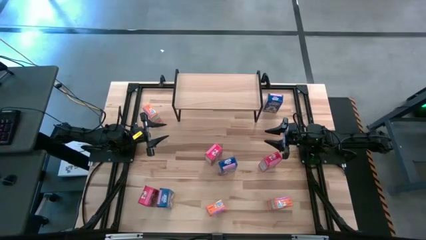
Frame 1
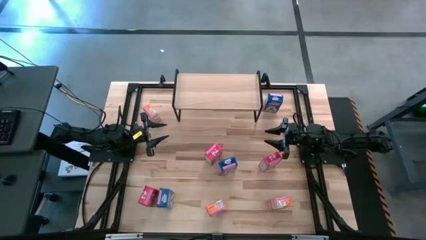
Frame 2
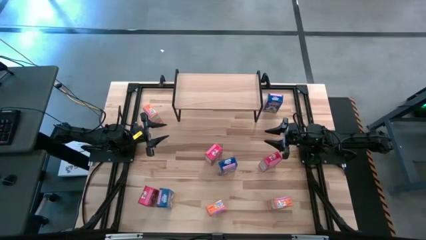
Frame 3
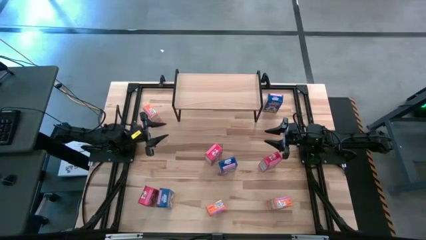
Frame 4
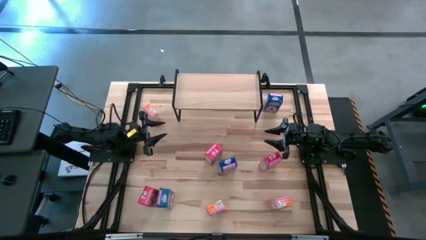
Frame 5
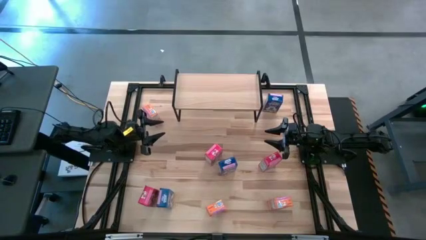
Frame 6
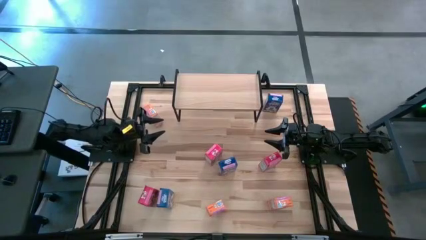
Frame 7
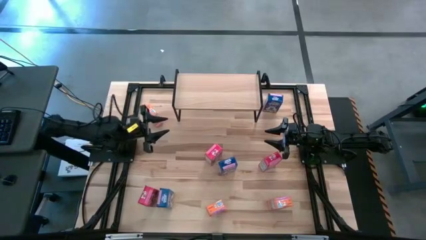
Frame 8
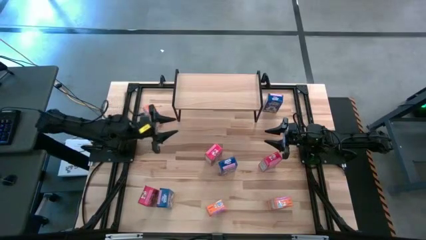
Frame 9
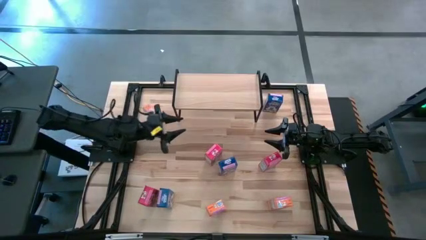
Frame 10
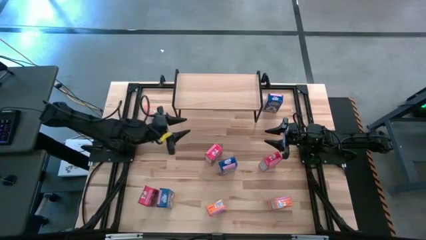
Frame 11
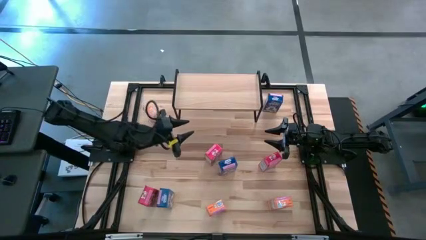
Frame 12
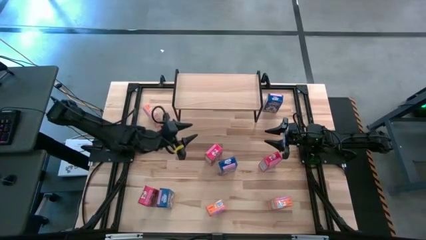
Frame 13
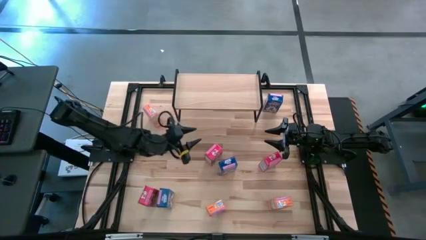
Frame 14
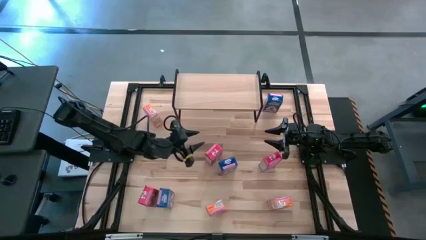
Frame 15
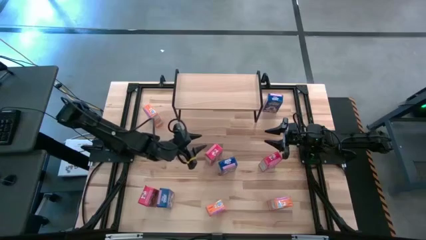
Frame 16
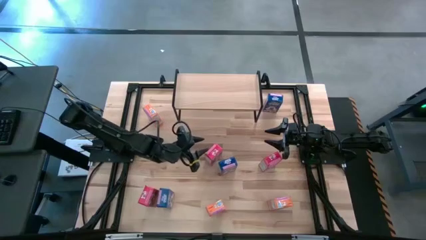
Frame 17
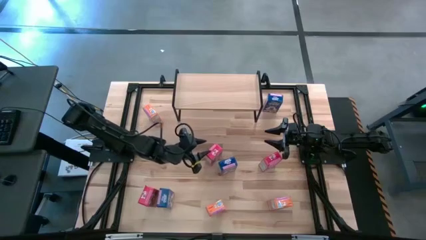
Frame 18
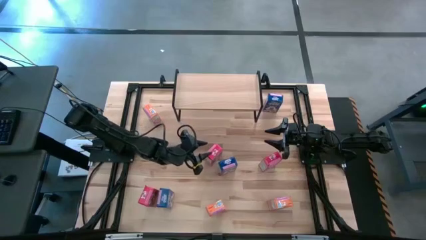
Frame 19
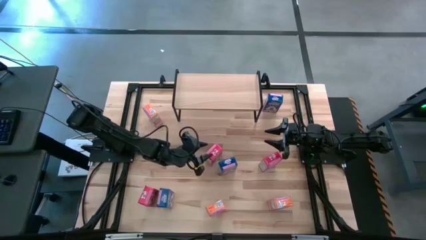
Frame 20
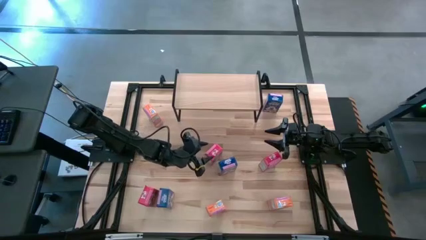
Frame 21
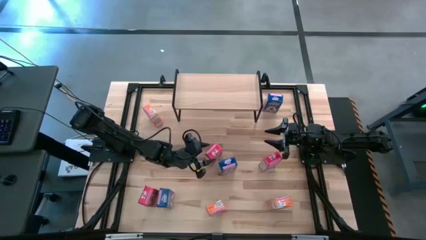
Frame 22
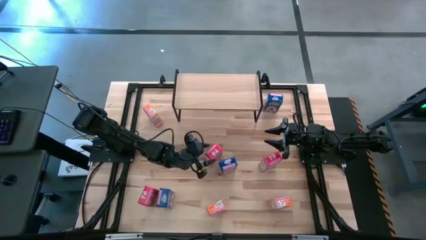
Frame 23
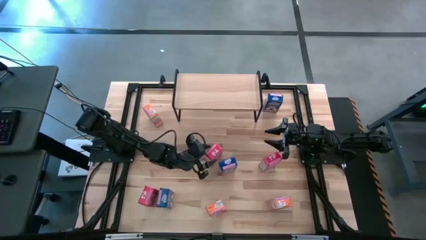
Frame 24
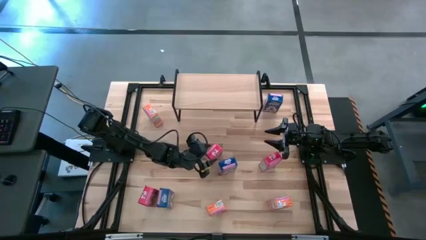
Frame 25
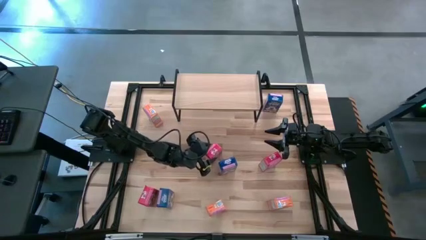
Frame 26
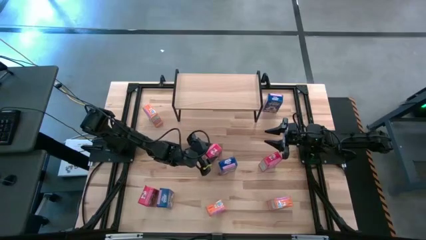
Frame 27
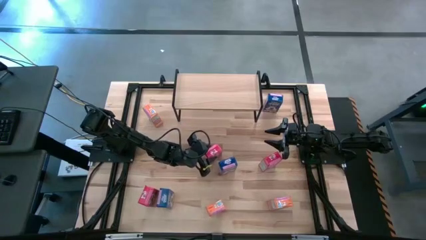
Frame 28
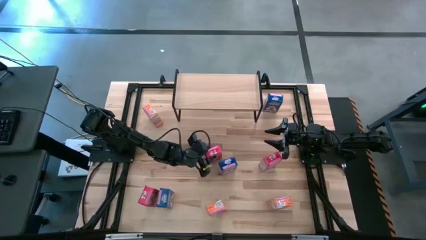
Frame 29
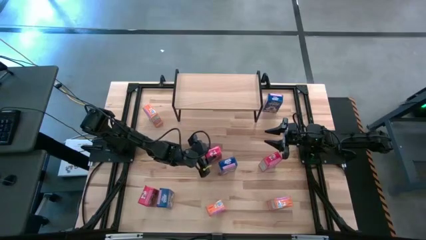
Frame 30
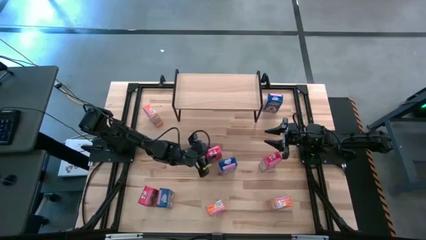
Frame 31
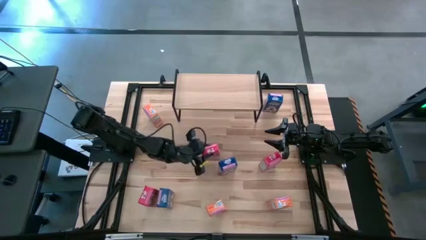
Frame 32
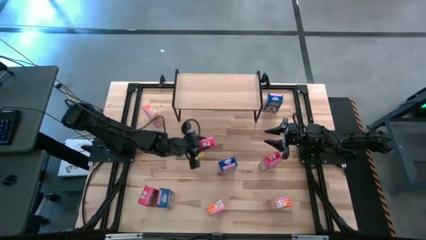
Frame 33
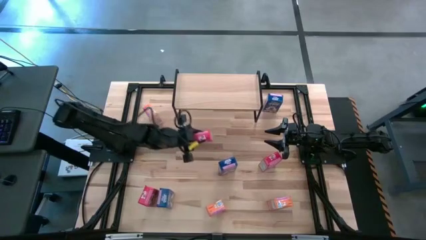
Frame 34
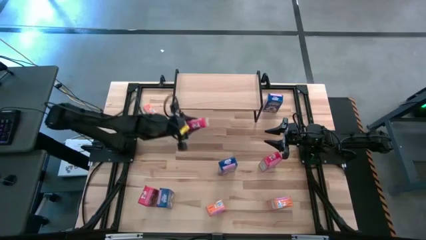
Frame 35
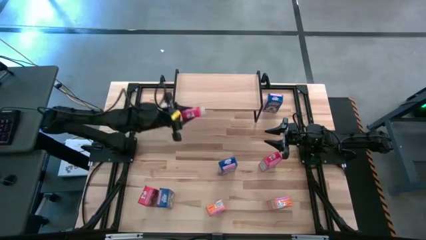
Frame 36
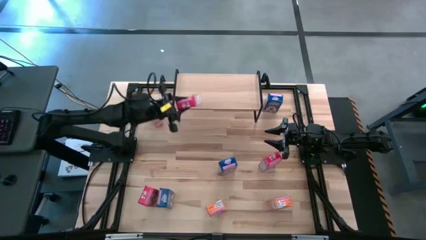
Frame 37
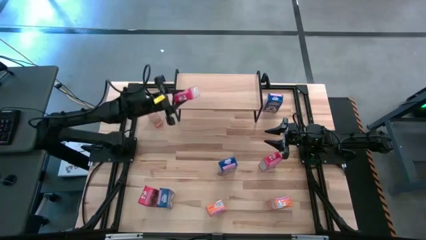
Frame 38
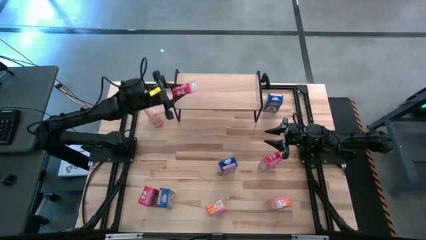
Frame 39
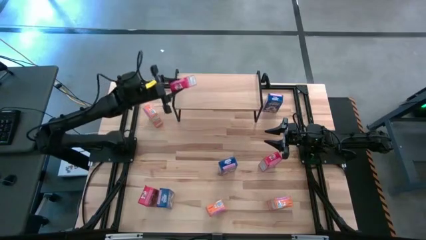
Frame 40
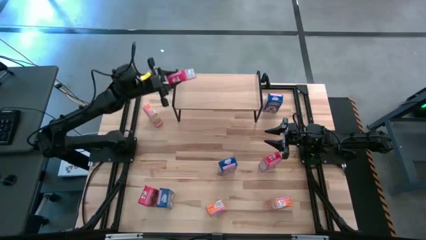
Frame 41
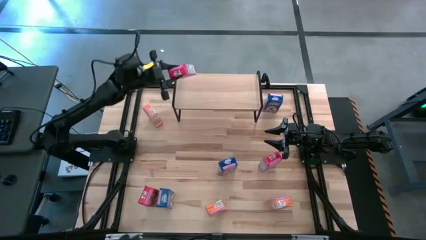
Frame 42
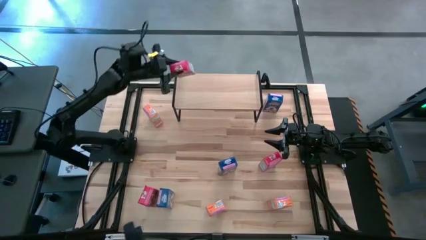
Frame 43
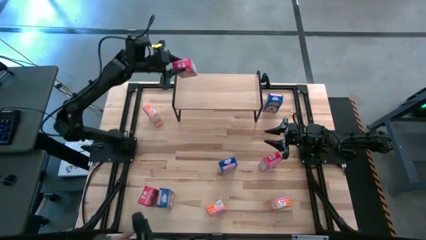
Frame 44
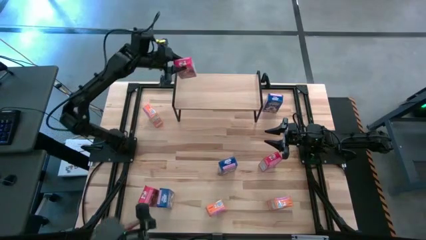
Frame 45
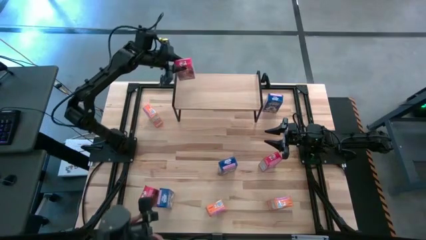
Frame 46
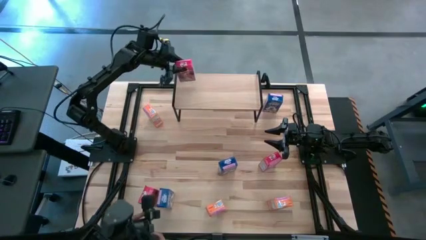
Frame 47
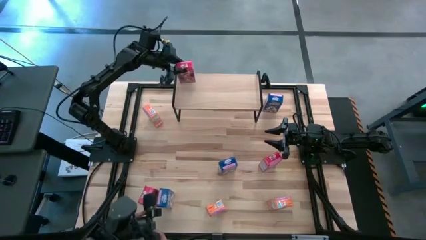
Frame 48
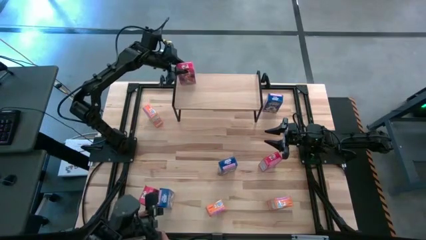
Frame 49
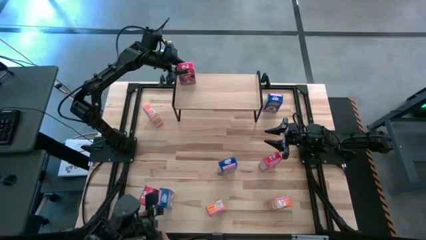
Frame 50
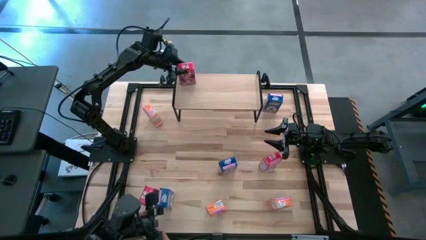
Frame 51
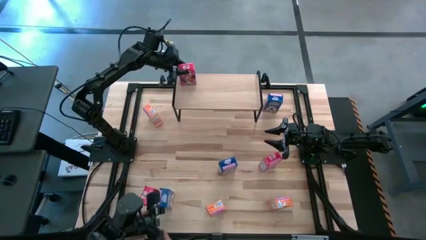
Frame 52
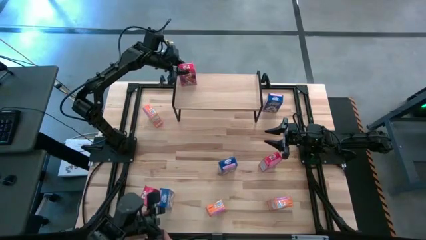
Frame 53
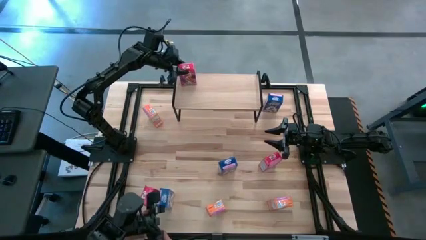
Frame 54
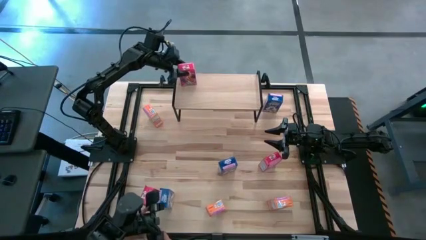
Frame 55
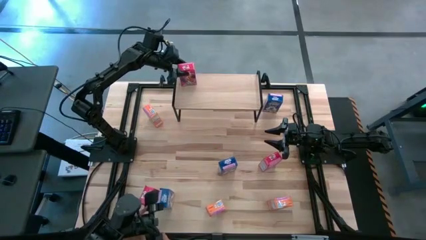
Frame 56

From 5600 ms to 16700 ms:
Task: Stack cereal on shelf
Put the middle red cereal box on the shelf

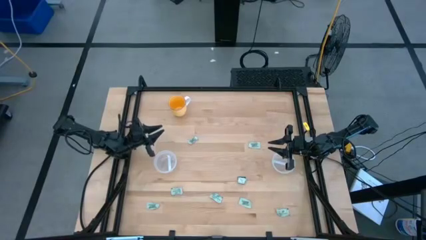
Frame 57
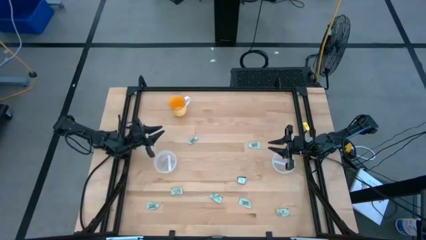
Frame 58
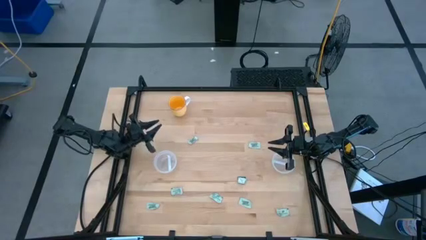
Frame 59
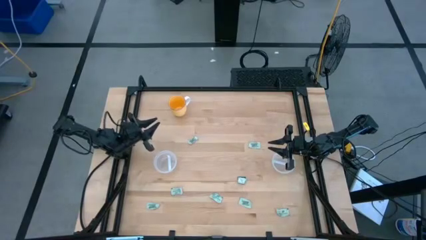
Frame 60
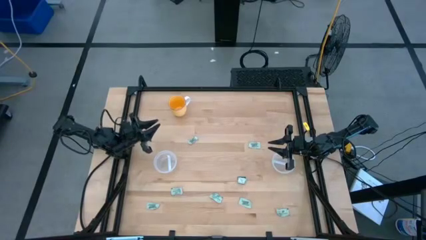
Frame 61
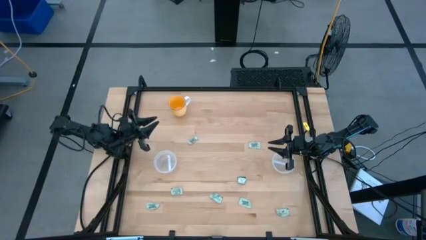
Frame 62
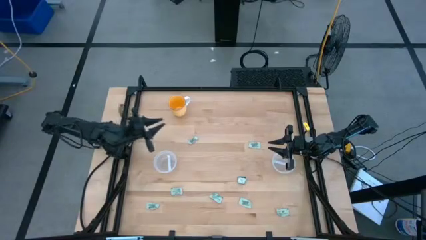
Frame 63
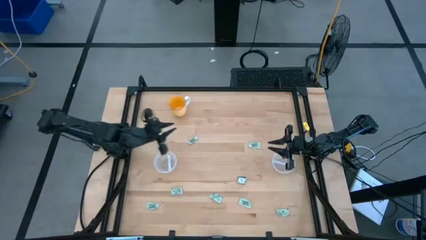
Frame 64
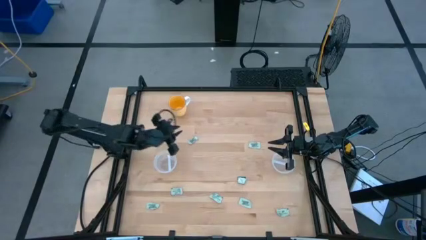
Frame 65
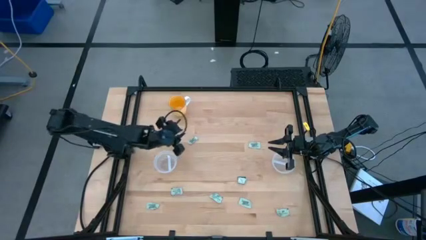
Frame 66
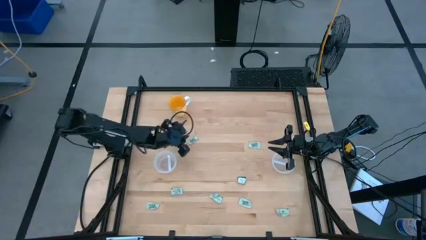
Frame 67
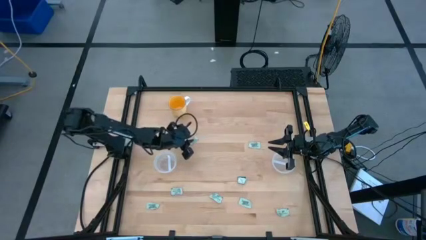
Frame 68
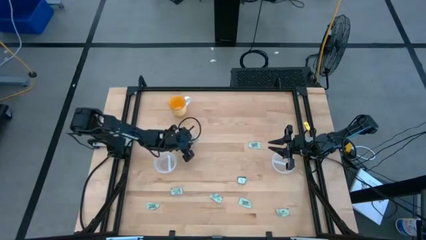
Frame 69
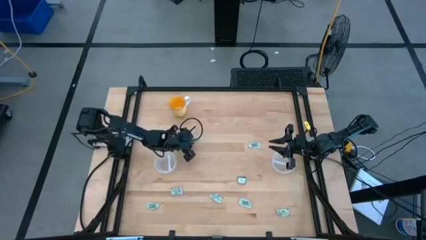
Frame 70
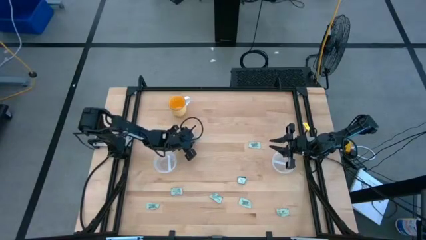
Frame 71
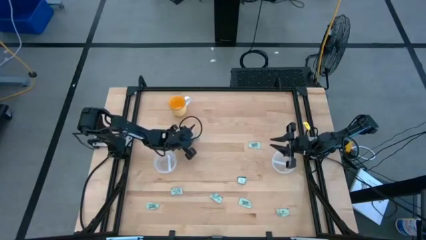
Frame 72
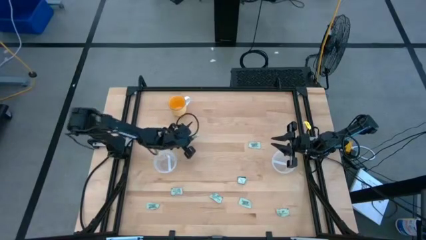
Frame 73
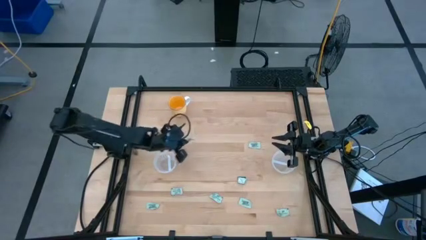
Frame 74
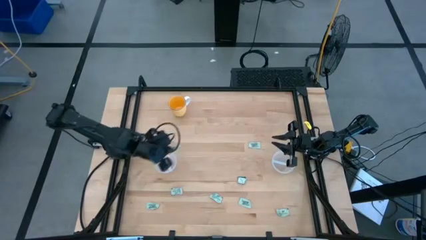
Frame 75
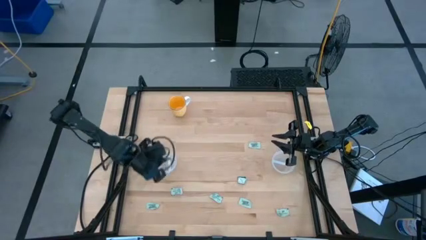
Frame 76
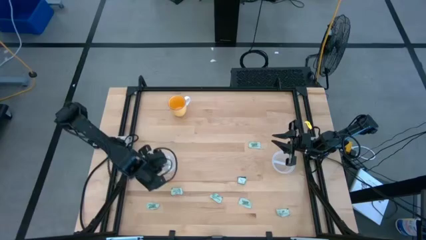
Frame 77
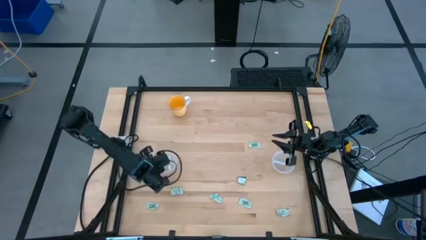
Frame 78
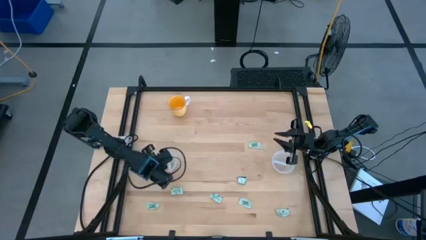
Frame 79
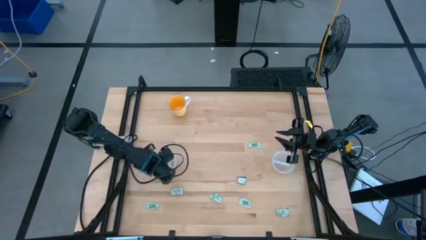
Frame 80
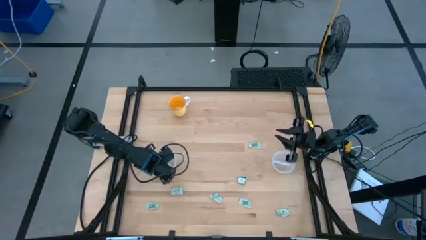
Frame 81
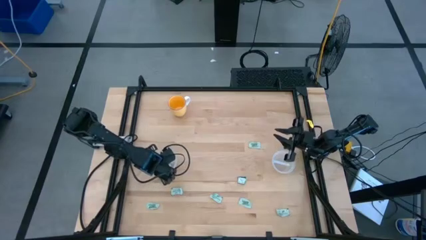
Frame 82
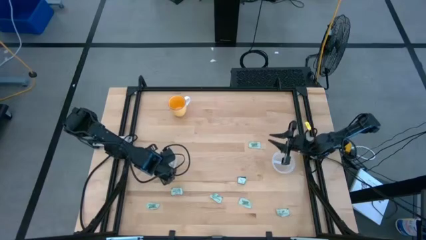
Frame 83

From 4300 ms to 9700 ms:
Task: Pick and place items into bin
Put the stevia packet into the left transparent bin
